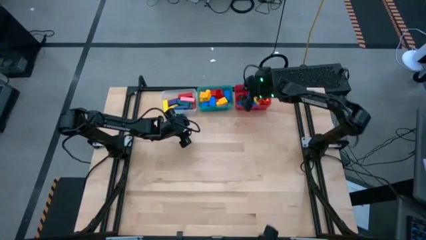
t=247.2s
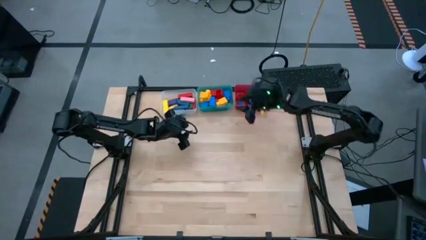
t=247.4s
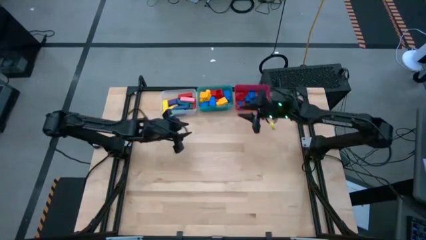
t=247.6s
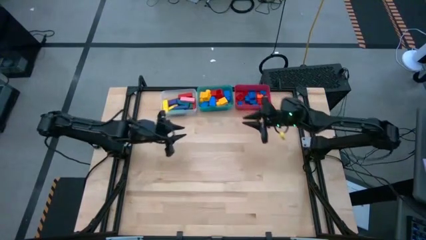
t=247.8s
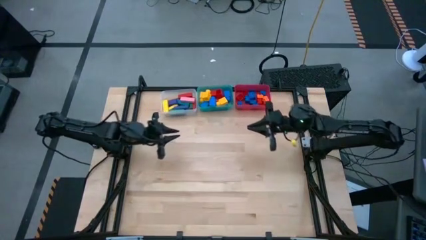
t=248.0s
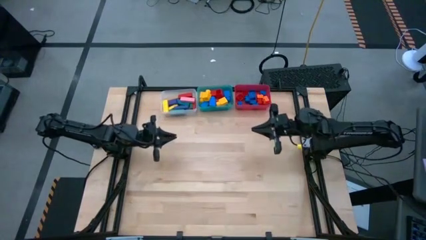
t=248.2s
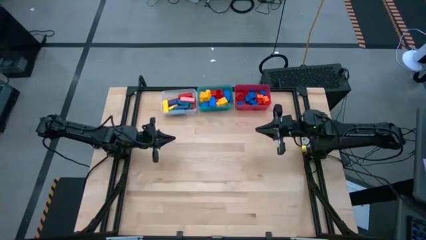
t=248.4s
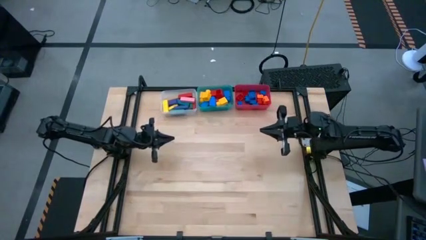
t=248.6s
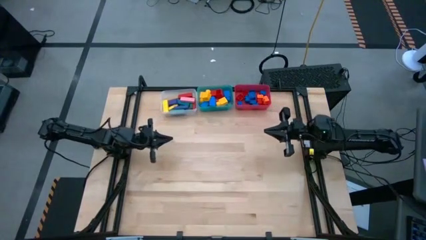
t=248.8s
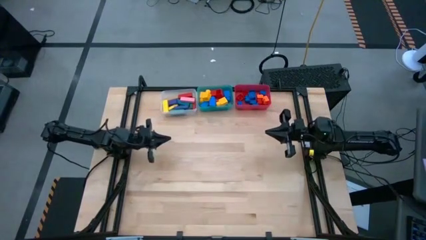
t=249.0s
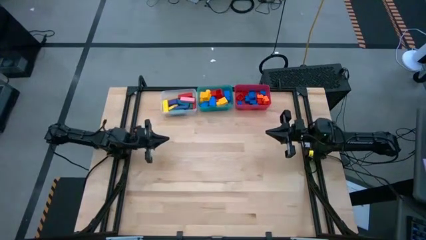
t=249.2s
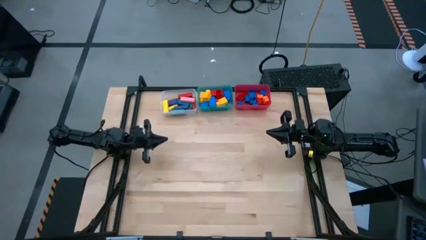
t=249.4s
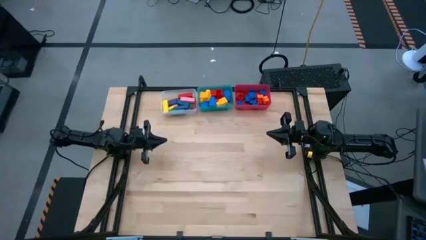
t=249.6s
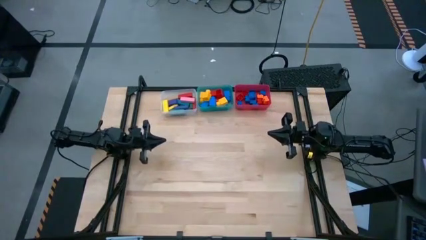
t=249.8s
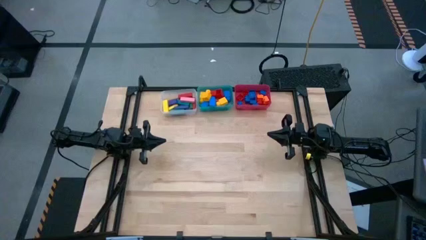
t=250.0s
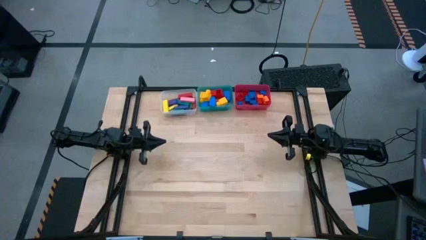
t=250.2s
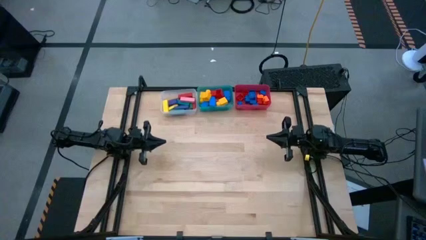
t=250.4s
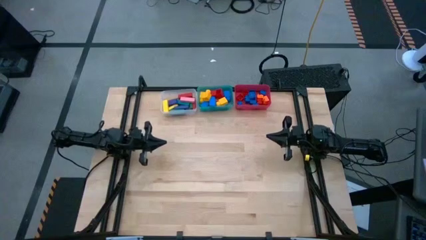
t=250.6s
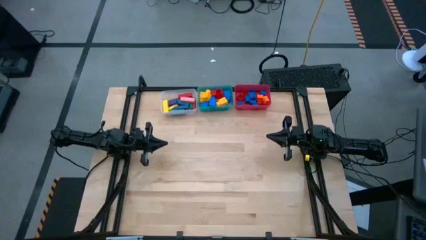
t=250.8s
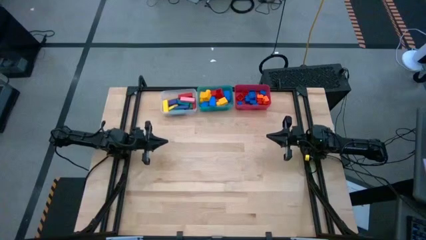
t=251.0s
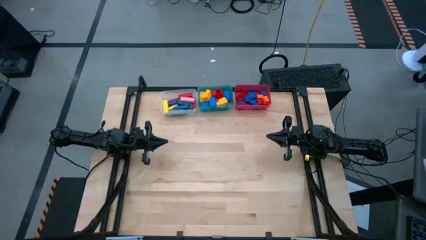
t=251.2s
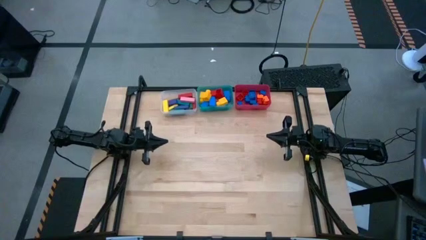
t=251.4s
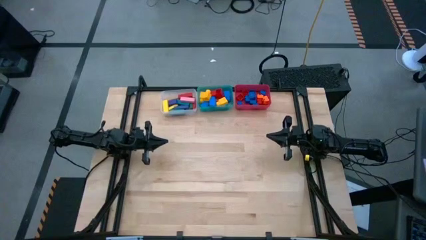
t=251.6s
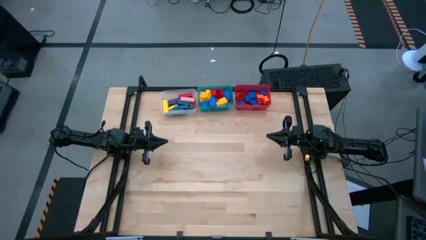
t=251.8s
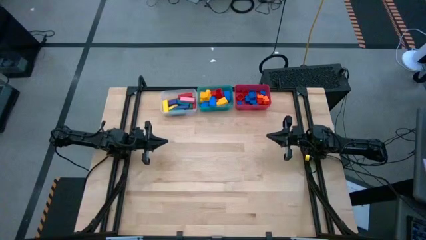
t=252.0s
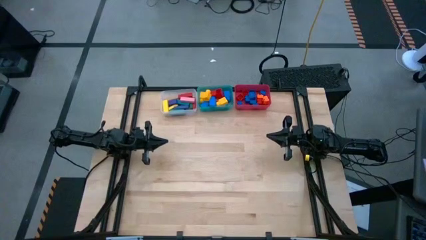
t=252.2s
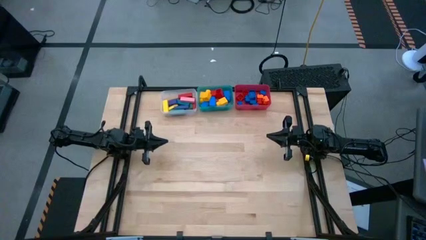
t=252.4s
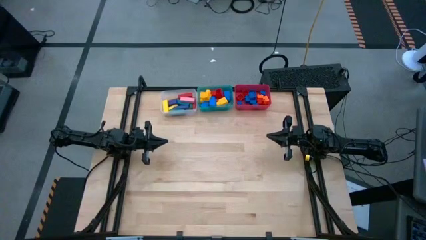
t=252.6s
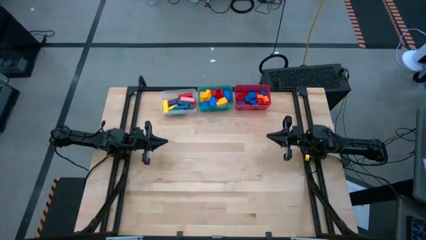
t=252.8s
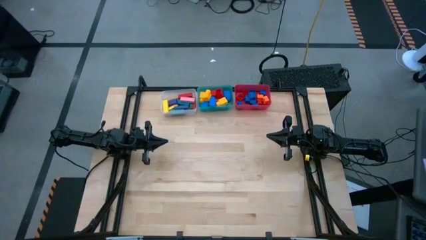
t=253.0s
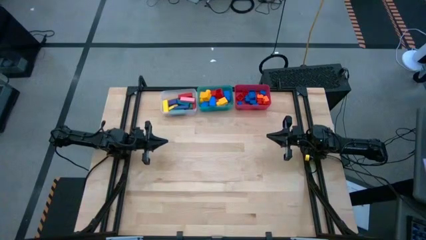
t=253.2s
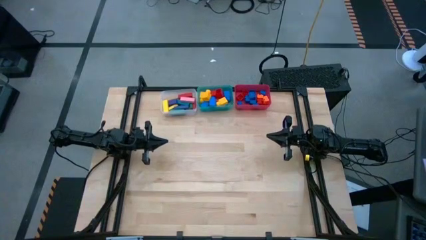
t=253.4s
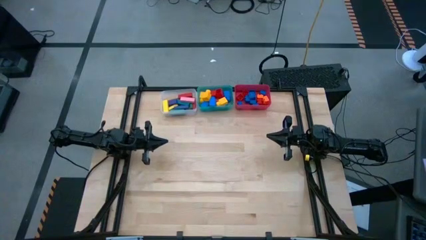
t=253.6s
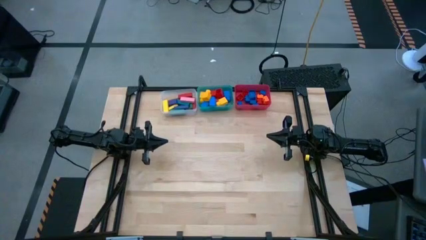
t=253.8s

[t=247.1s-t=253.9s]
Task: Sort blocks by size
Return to Home Position

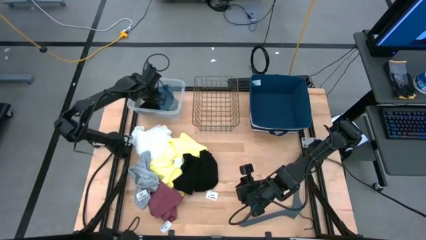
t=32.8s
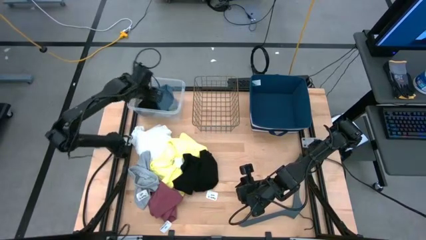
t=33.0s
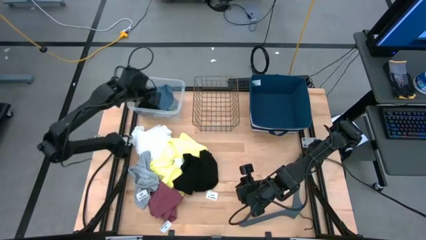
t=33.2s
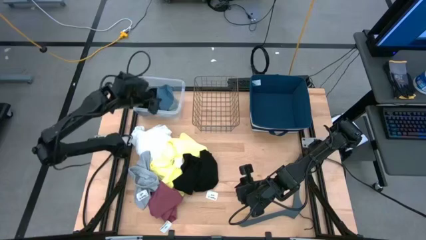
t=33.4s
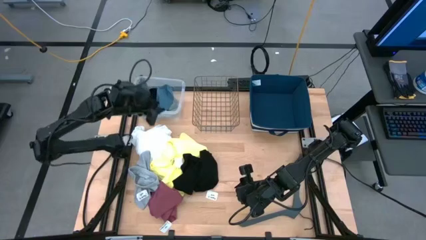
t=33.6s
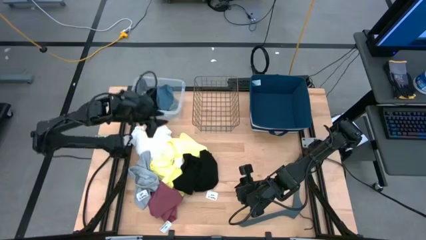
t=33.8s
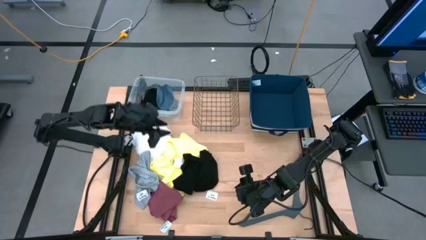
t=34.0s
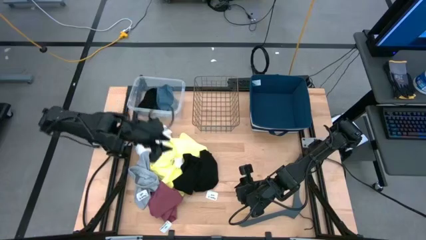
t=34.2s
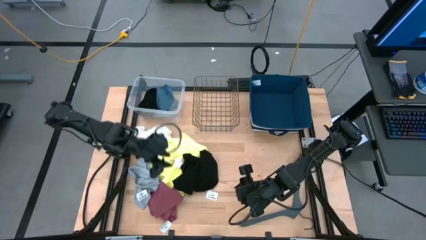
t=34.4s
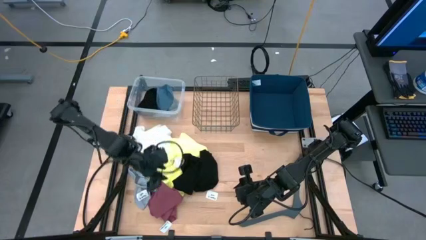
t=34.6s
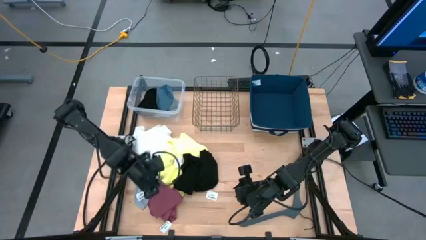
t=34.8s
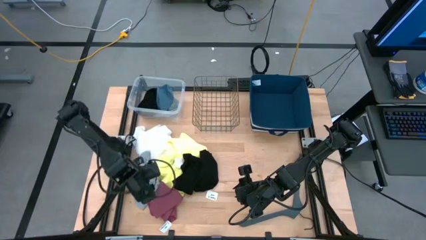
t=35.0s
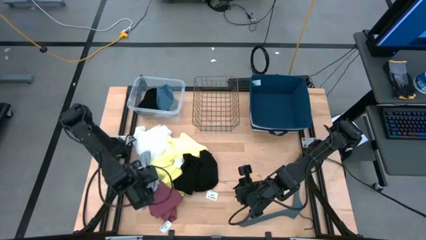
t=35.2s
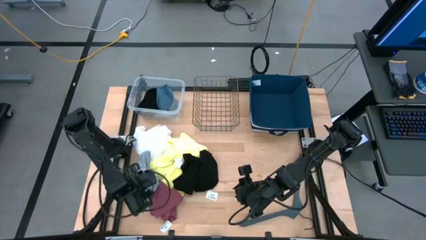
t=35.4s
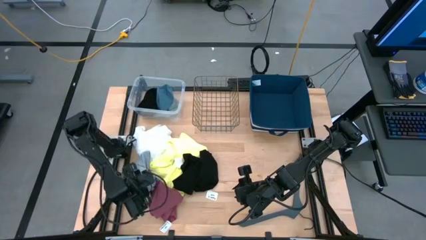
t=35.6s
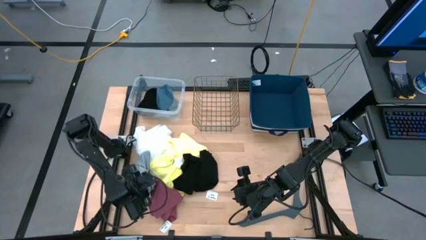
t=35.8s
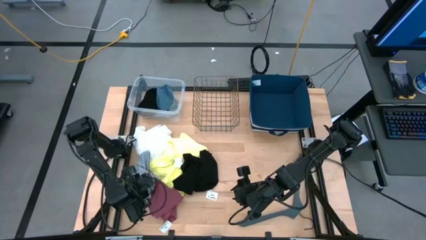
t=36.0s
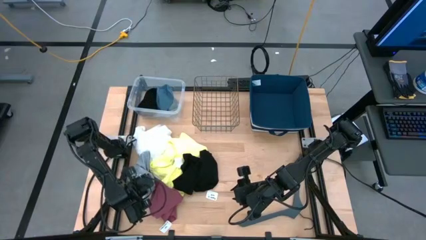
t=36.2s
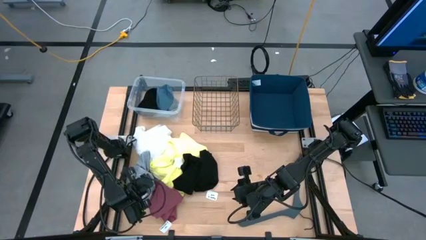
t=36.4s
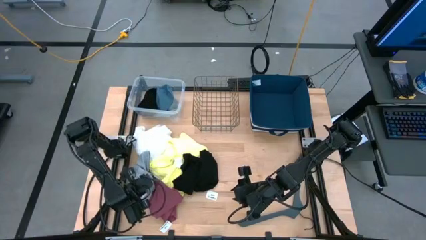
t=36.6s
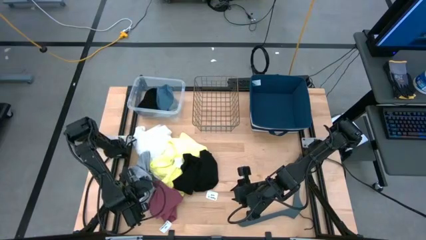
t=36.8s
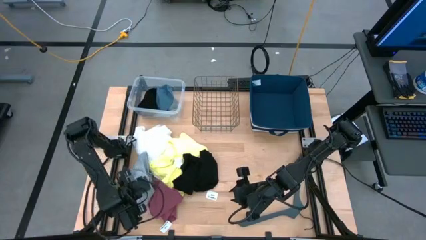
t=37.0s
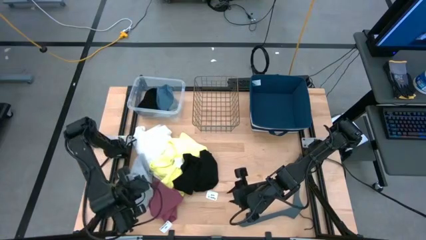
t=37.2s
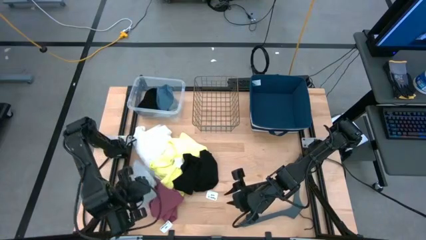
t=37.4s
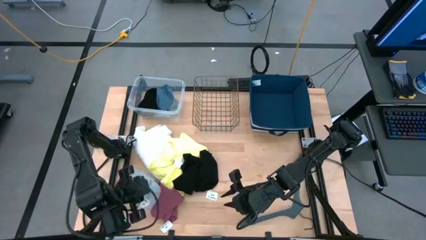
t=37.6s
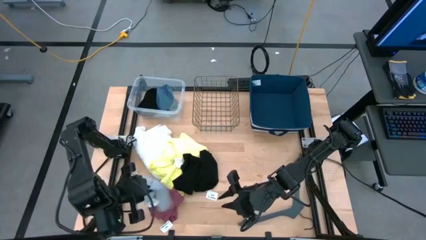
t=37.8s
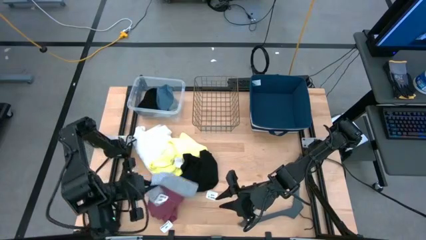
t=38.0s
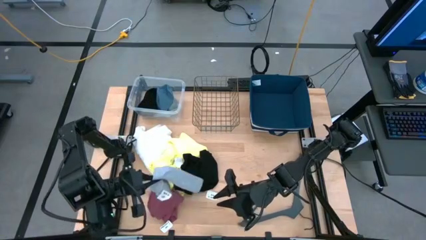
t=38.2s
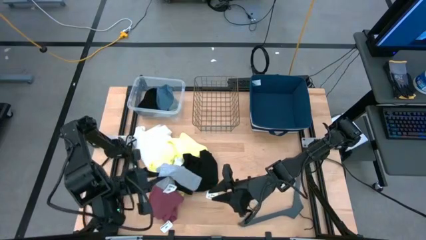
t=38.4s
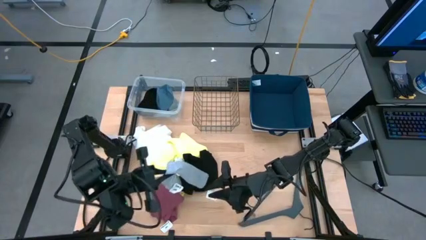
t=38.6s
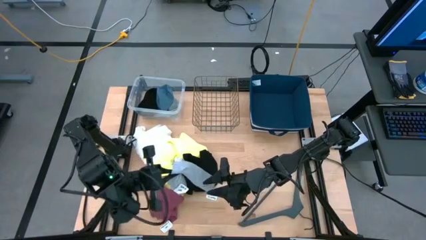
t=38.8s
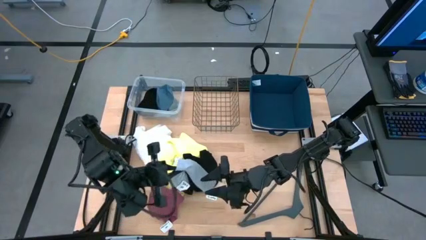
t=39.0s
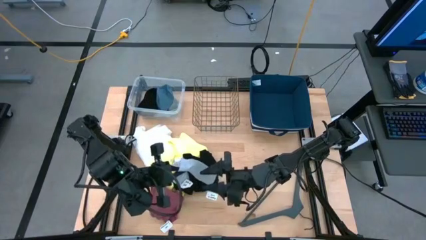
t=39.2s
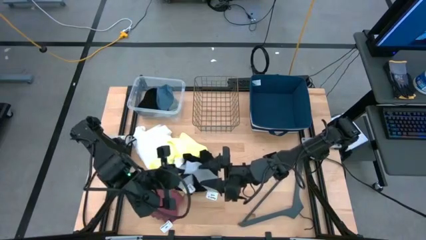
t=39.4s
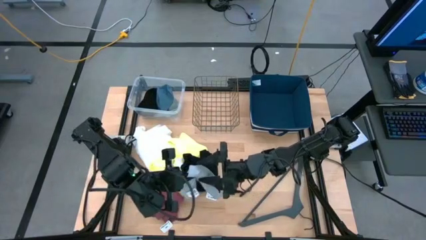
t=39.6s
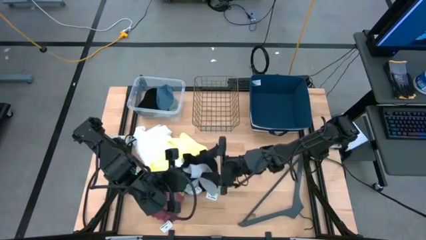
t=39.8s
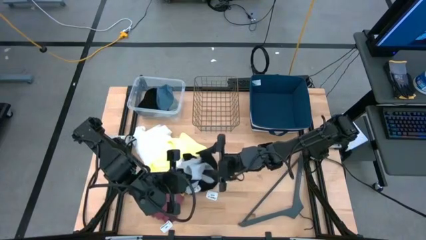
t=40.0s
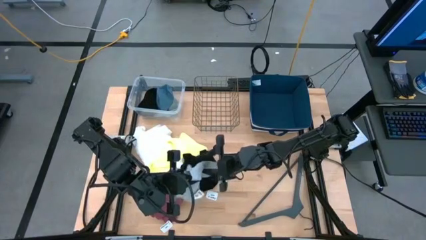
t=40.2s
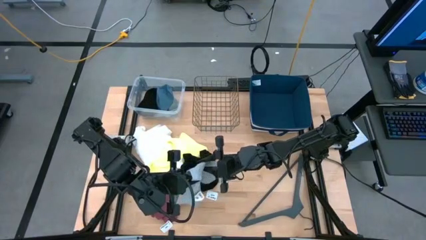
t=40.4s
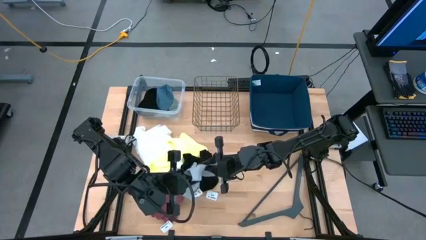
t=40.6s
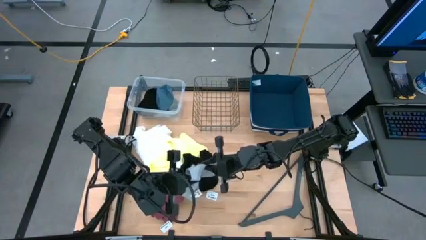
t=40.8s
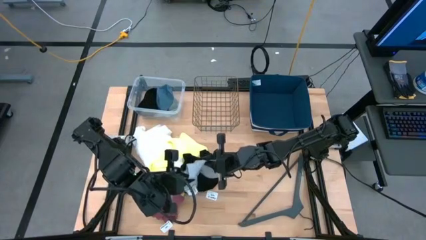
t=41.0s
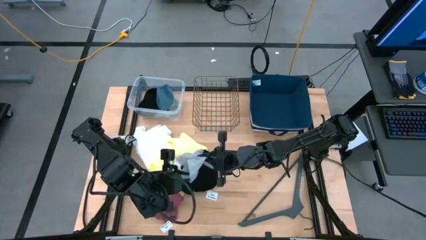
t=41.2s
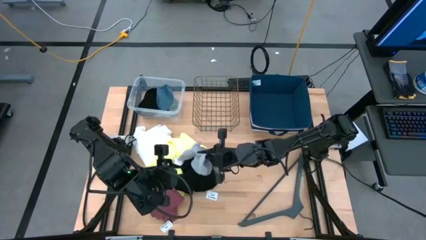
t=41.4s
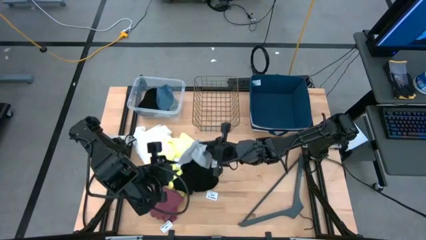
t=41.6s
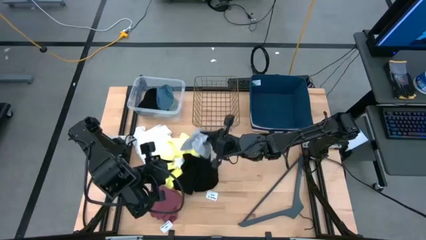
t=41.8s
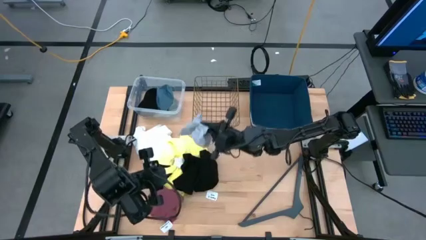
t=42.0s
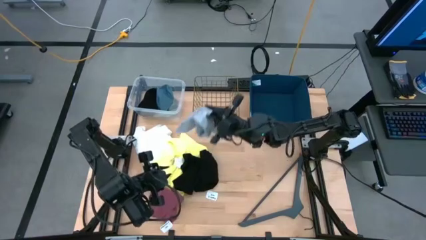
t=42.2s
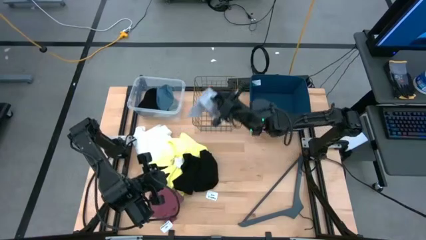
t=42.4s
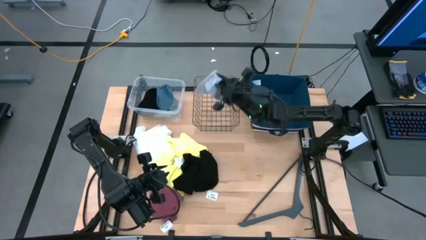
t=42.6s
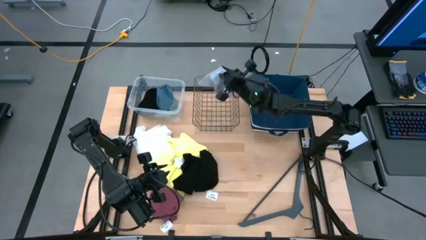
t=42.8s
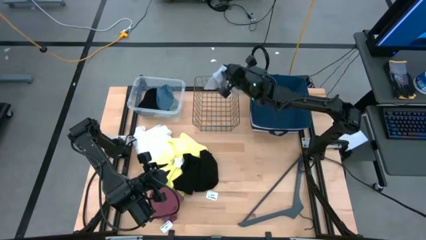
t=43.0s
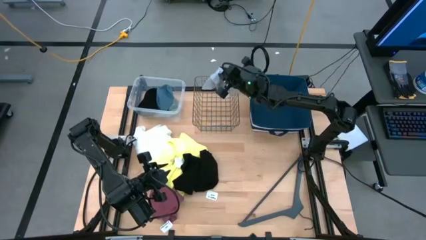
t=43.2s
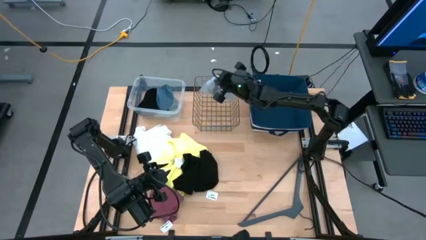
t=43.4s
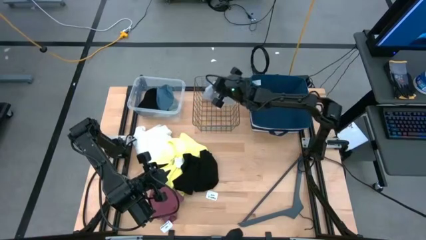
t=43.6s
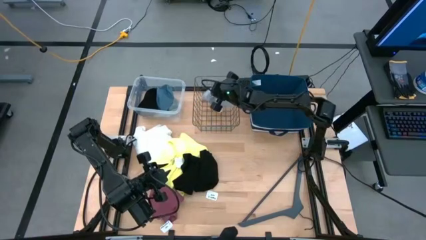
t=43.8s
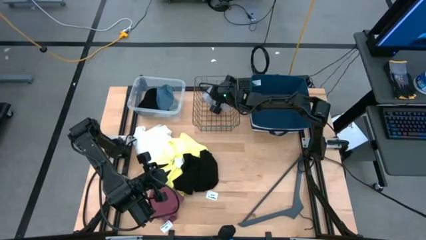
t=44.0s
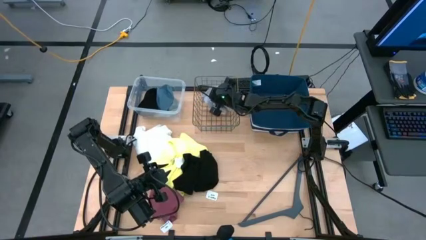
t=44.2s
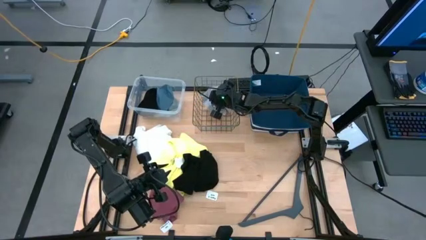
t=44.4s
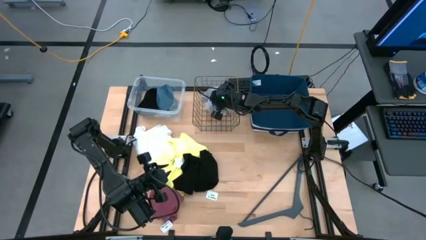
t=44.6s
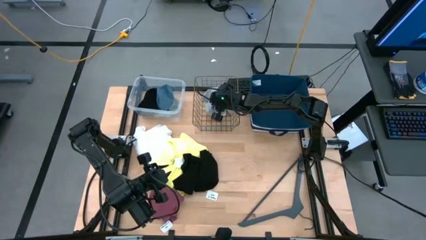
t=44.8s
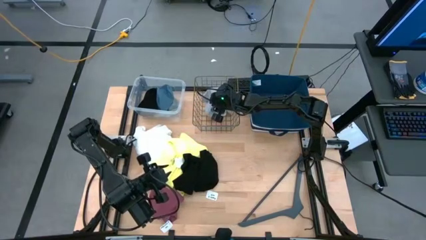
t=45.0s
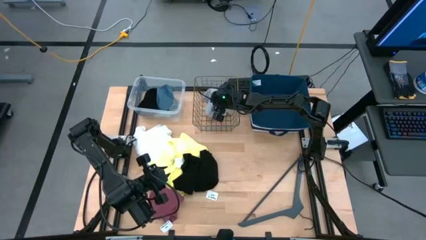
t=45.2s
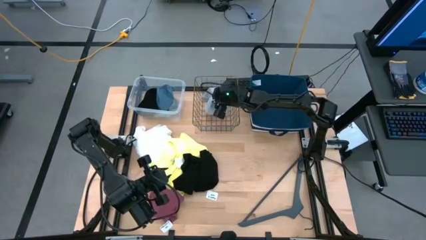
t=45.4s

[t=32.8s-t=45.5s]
Task: Pick & Place Cloths
Put the gray boxer into the gold wire basket
